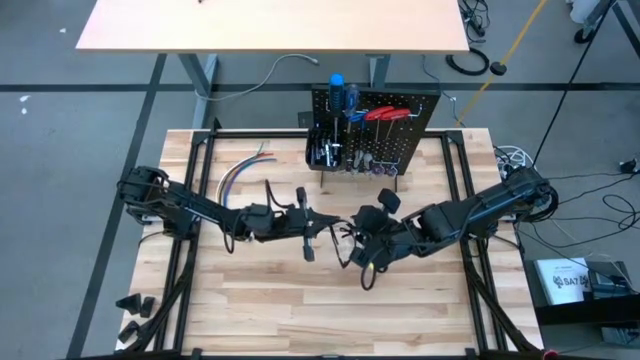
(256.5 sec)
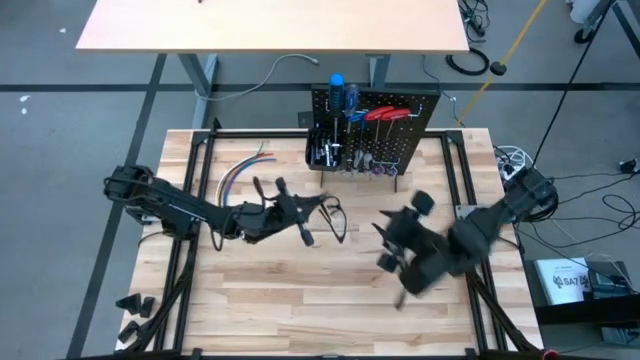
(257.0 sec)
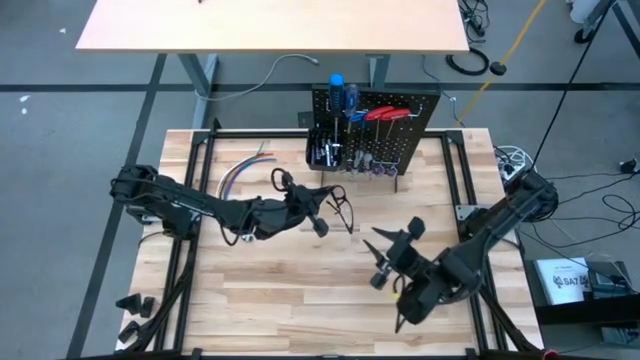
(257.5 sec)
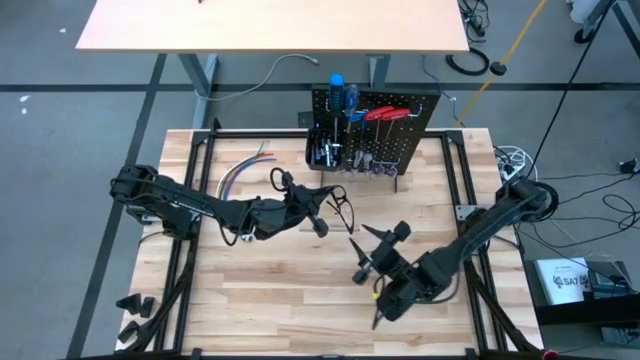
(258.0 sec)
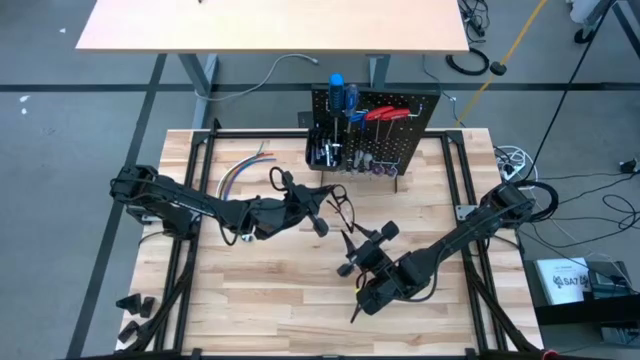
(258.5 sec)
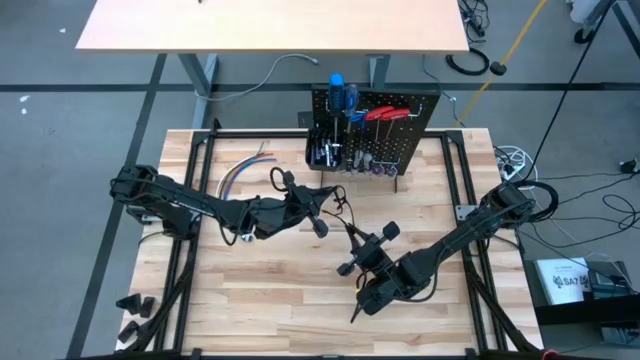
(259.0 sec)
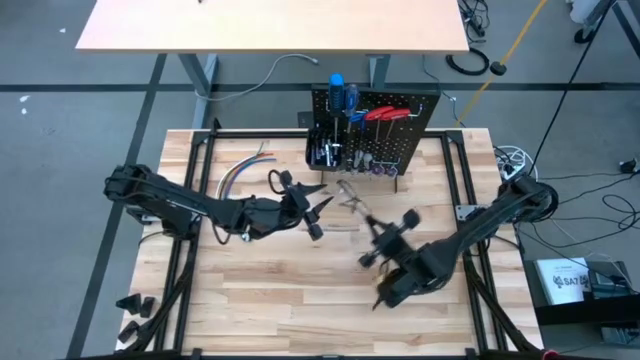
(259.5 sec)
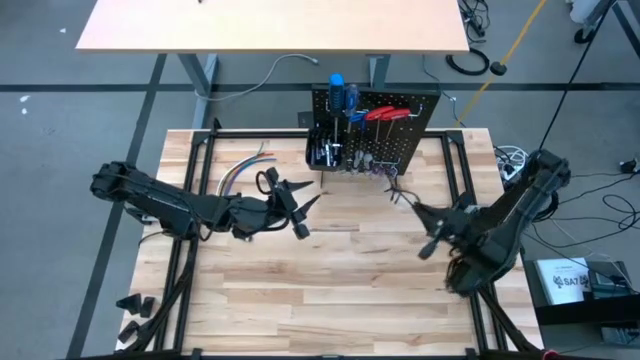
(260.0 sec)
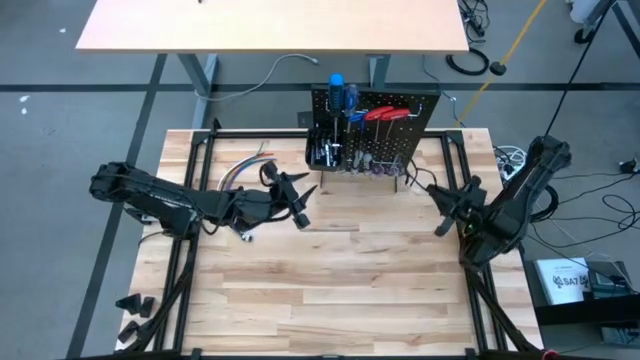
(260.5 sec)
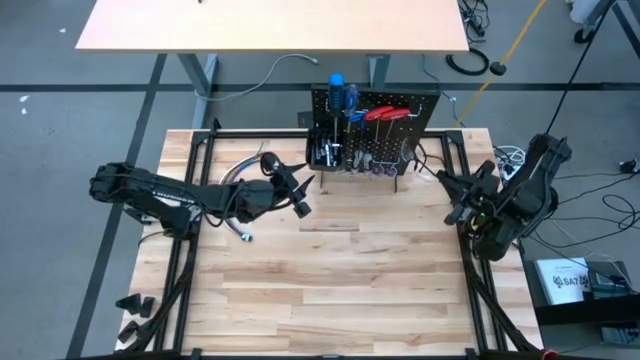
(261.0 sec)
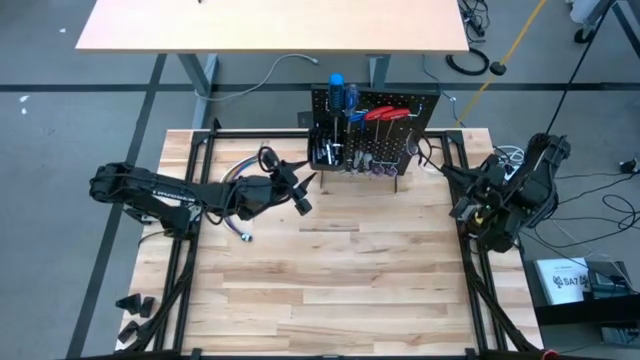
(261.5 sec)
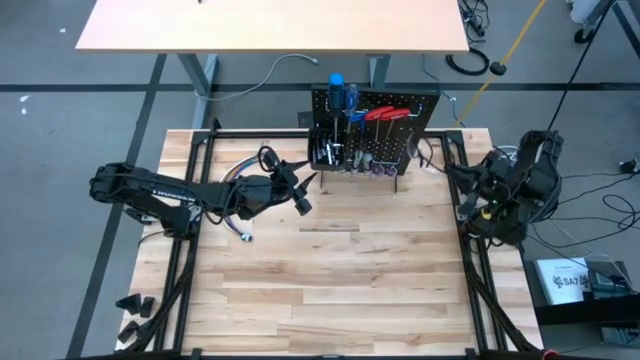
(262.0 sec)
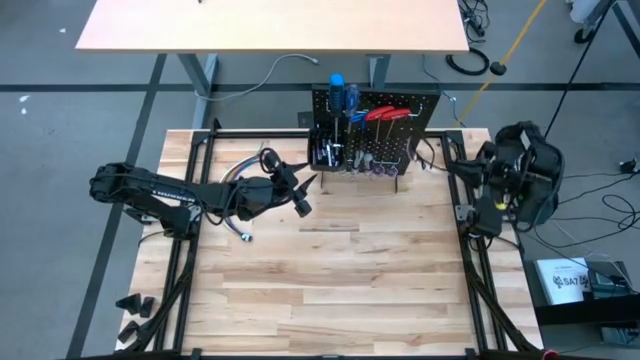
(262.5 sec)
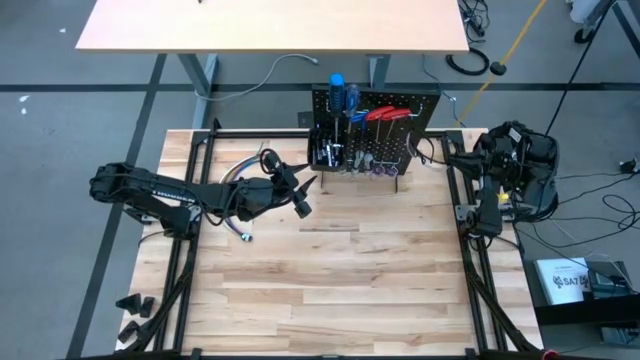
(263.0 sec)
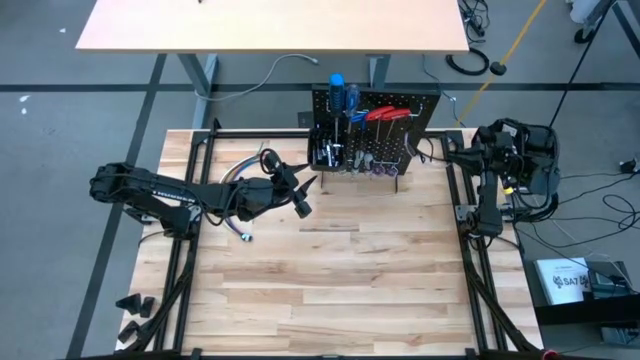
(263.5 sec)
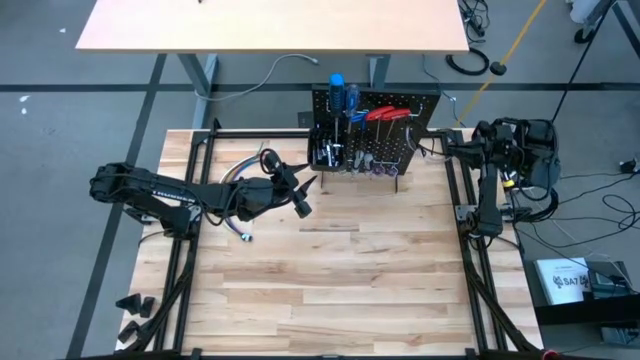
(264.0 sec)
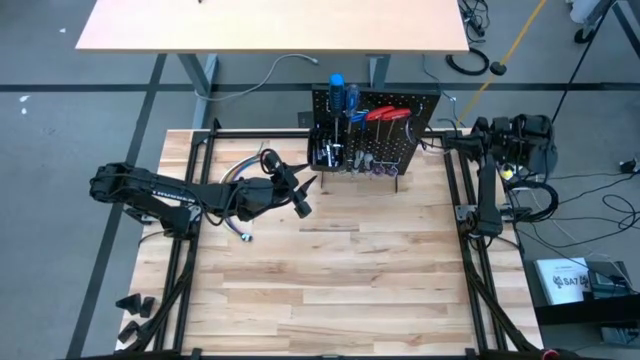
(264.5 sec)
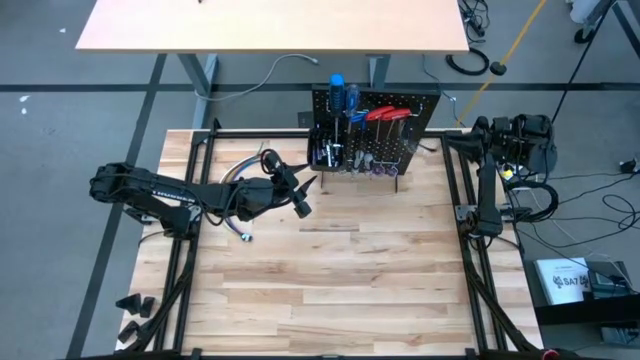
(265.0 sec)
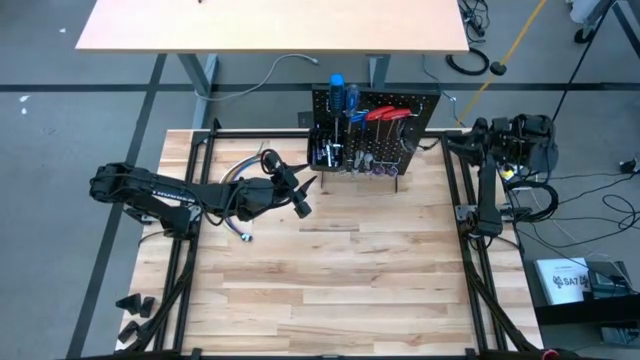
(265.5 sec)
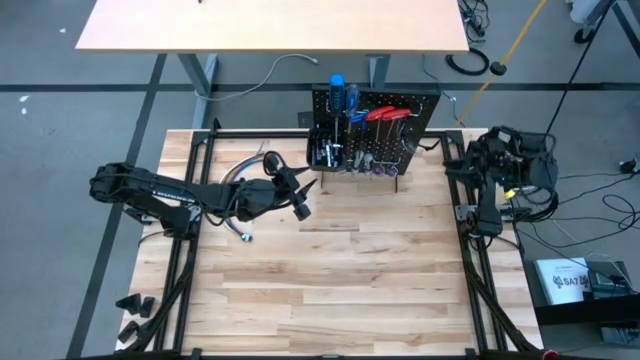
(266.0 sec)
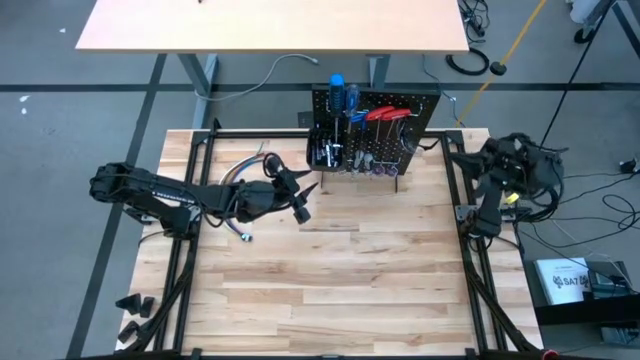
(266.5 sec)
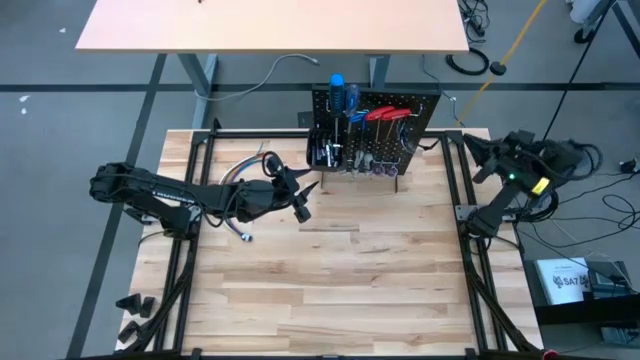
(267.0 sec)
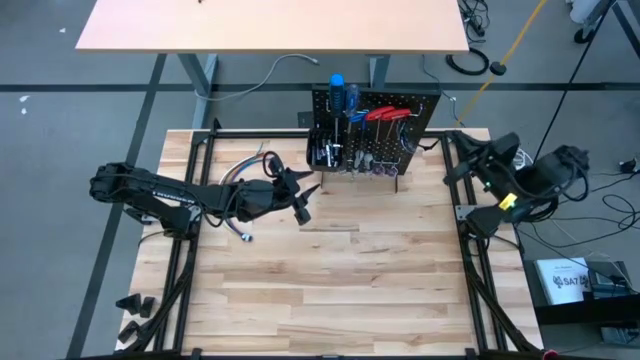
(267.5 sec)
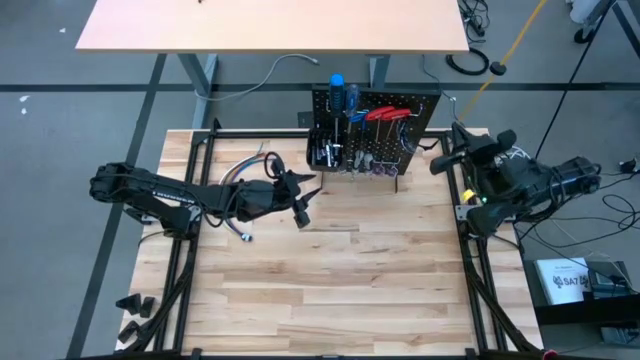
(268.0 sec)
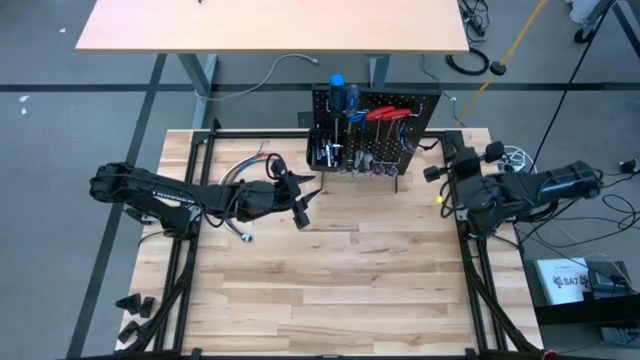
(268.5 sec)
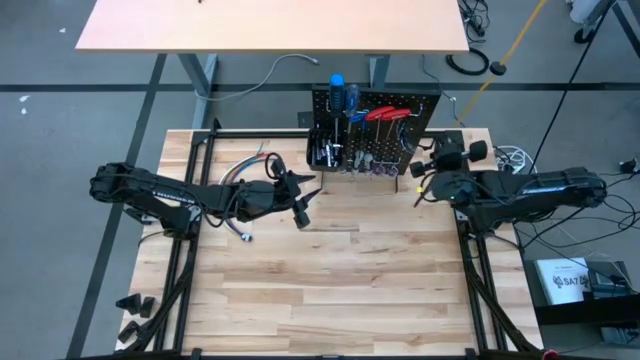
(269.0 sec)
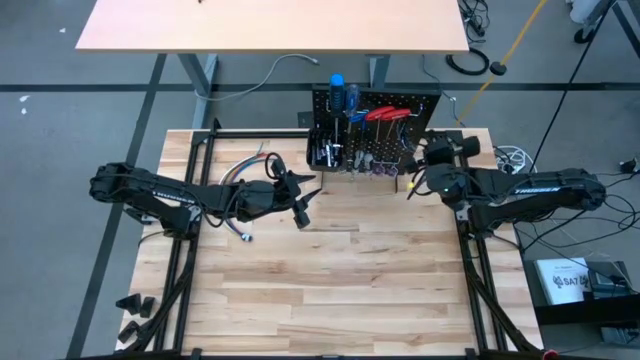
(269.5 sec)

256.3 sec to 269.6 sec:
Task: Hang tools onto peg board
Hang the black safety goggles on the peg board

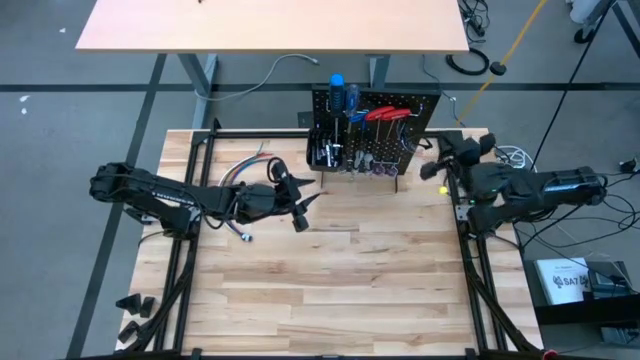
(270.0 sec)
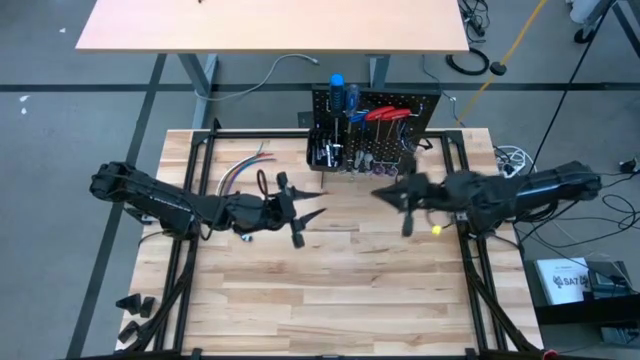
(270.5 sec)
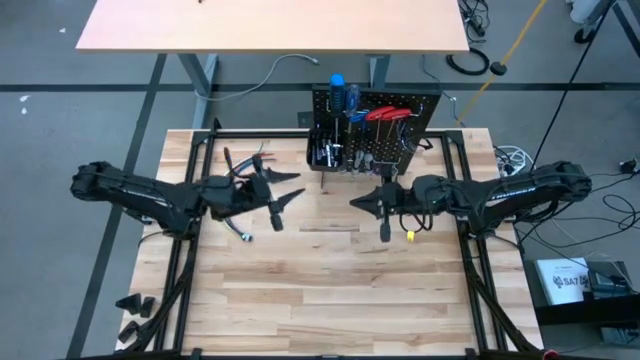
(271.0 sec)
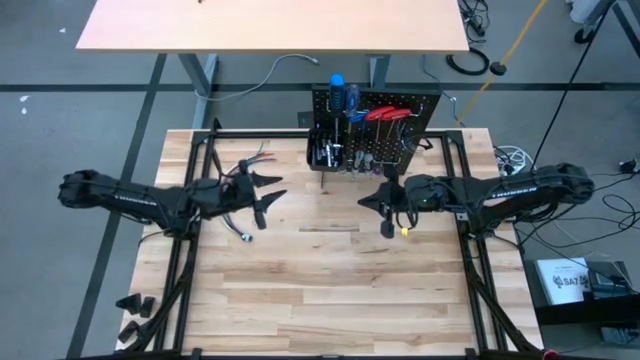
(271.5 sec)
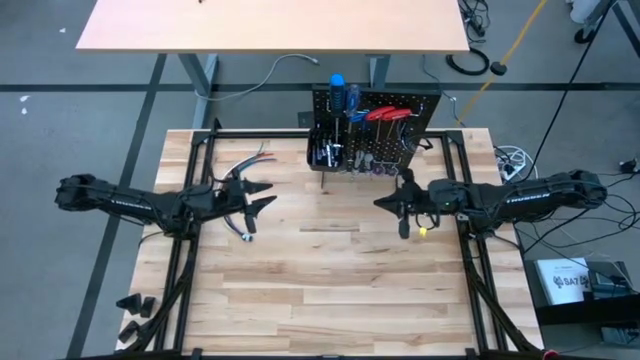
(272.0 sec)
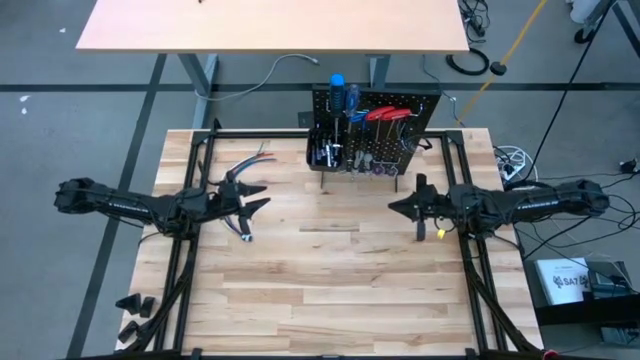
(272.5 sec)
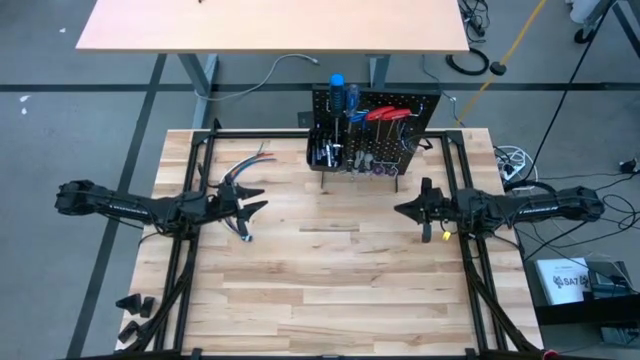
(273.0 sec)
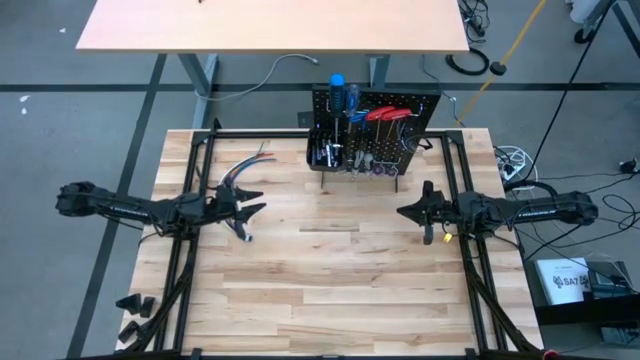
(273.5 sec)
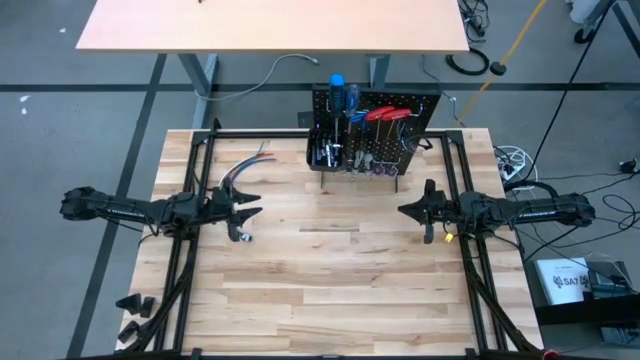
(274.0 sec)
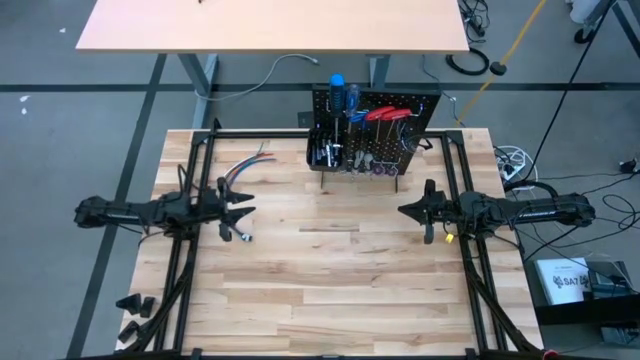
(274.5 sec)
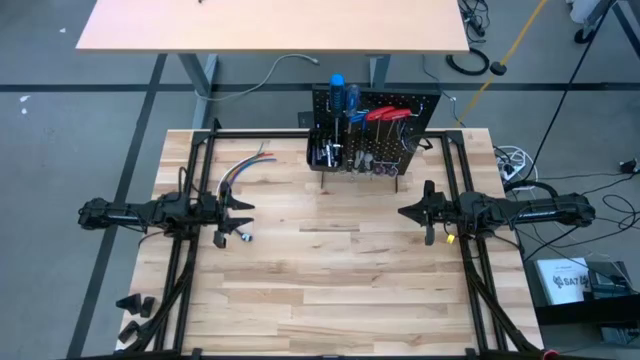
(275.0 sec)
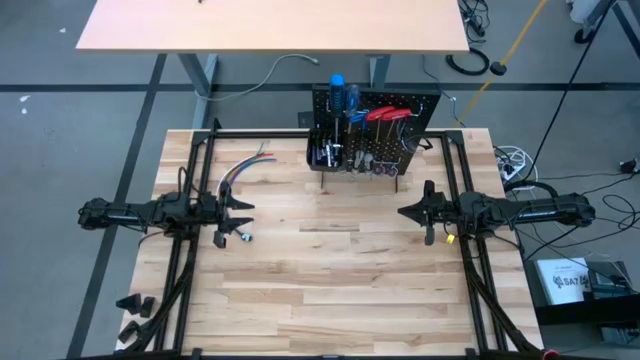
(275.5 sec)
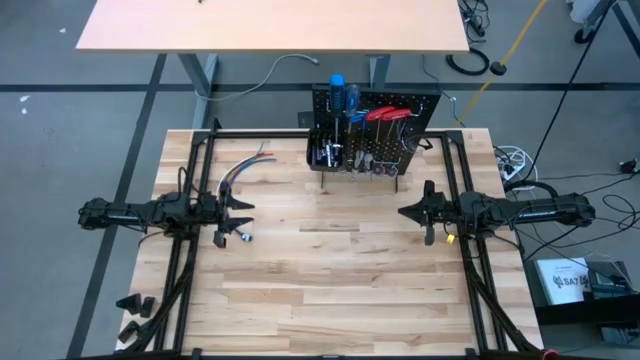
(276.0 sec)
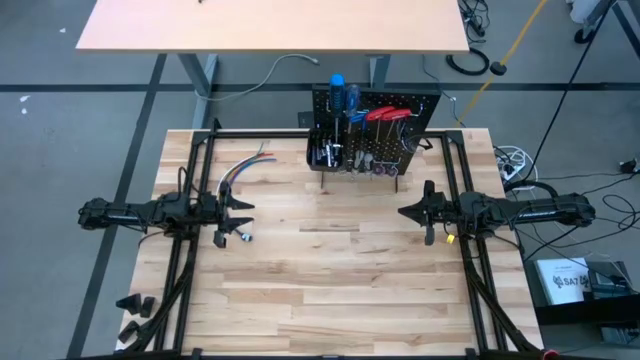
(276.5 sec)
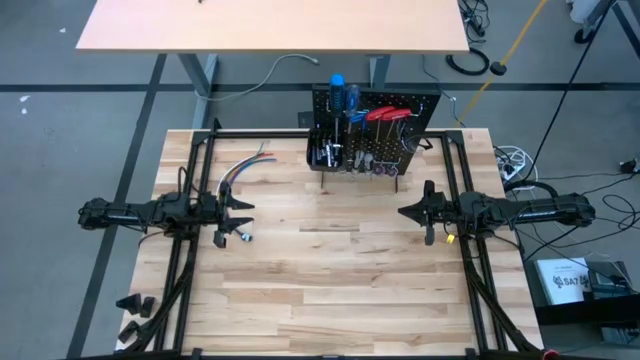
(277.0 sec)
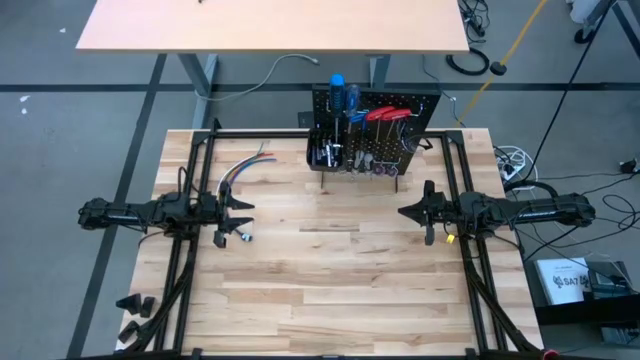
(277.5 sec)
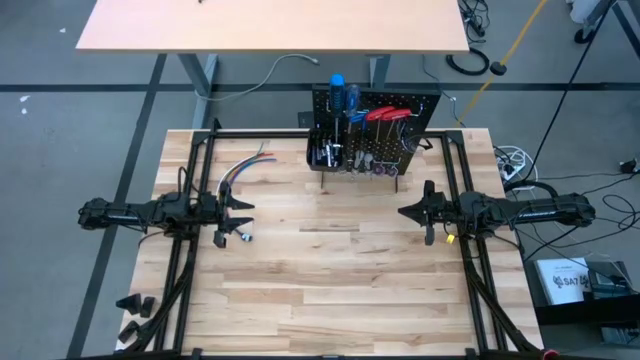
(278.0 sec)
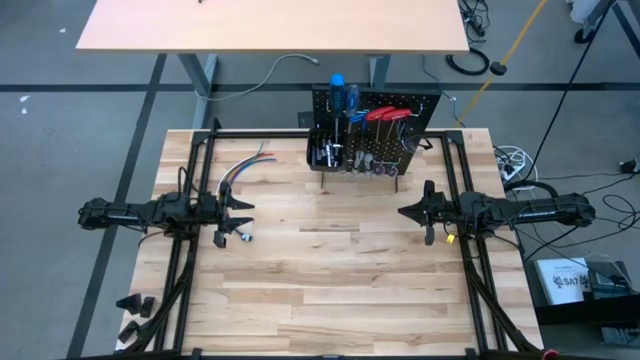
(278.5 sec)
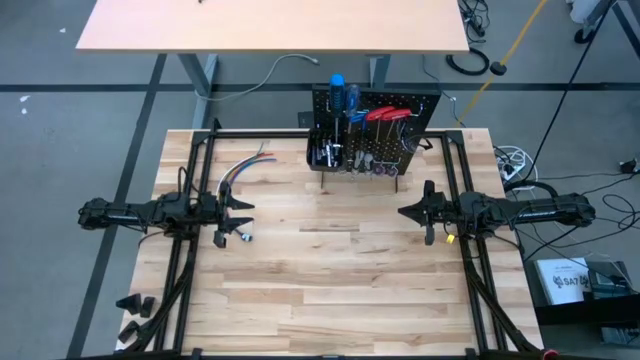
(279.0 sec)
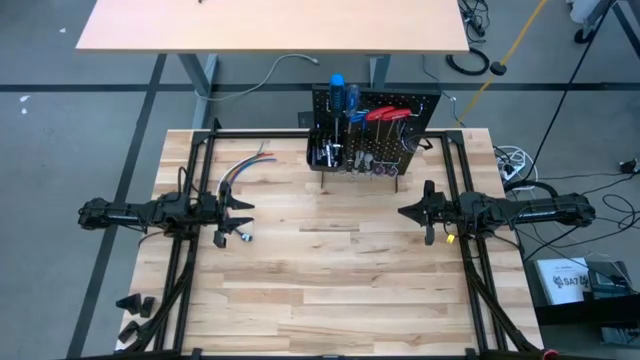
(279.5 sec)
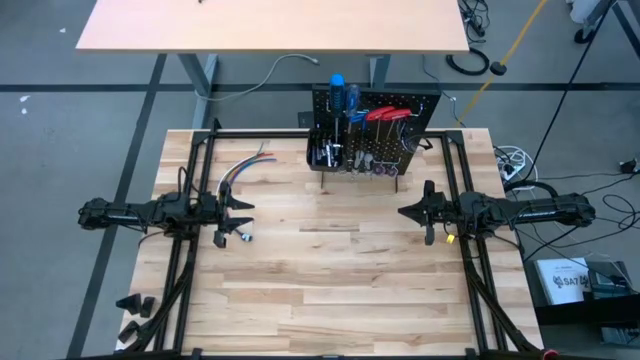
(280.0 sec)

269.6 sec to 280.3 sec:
Return to Home Position
